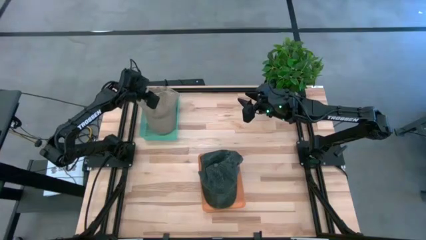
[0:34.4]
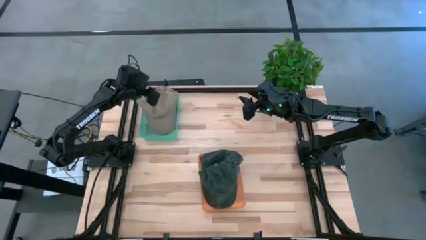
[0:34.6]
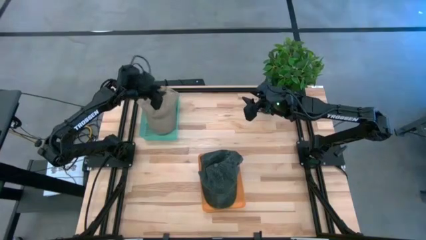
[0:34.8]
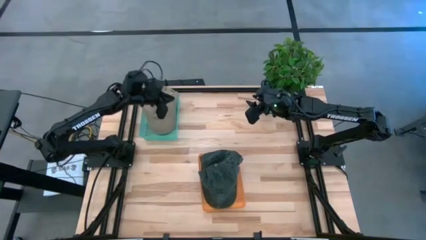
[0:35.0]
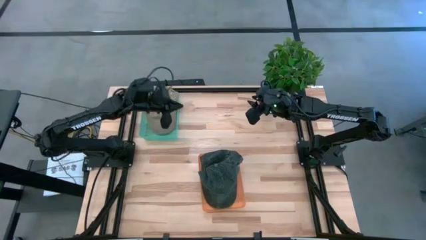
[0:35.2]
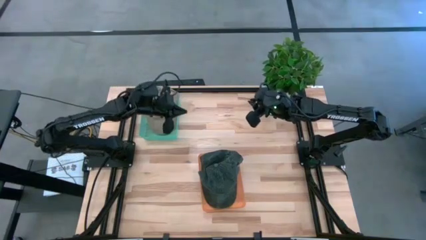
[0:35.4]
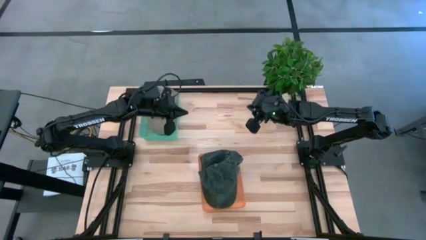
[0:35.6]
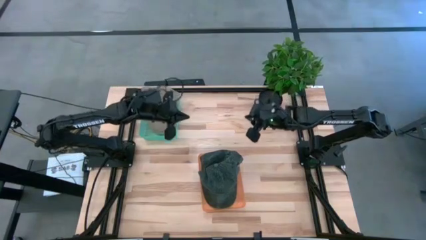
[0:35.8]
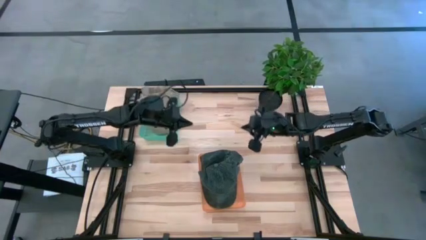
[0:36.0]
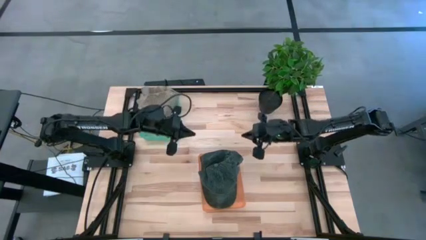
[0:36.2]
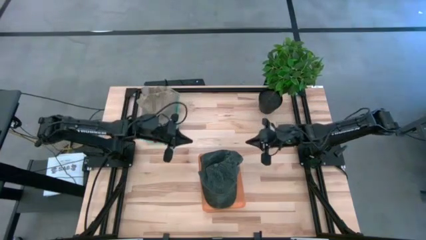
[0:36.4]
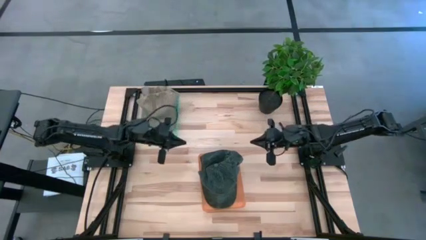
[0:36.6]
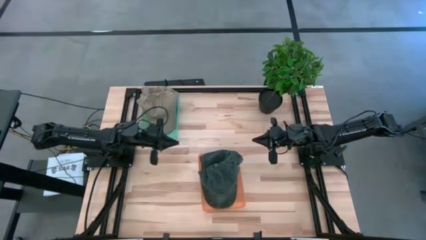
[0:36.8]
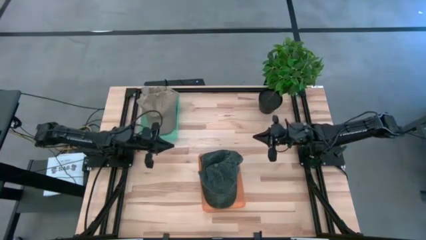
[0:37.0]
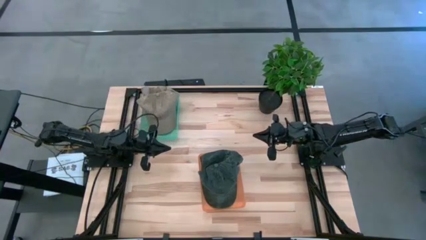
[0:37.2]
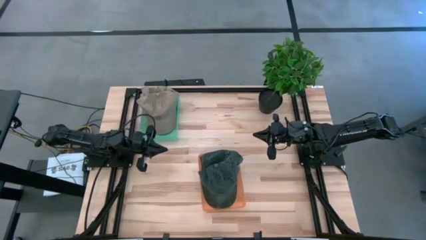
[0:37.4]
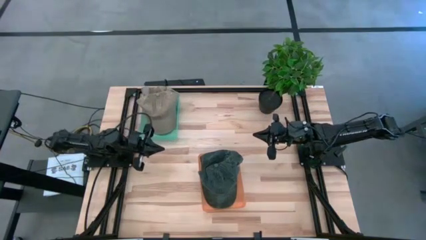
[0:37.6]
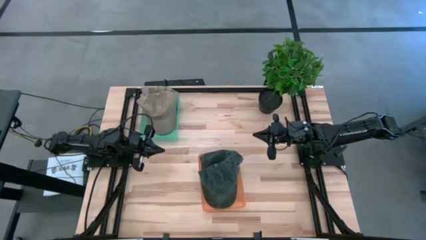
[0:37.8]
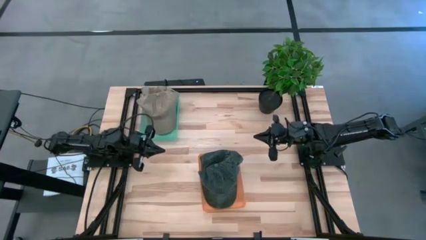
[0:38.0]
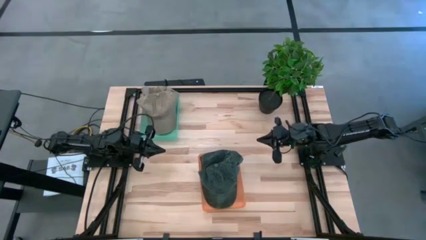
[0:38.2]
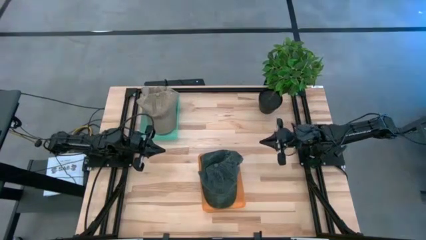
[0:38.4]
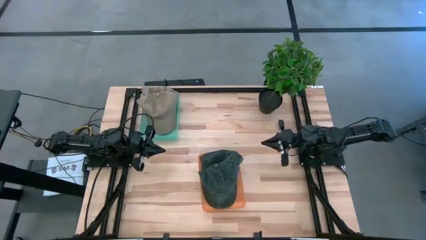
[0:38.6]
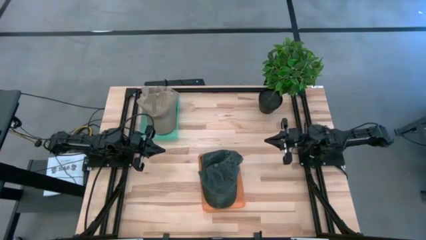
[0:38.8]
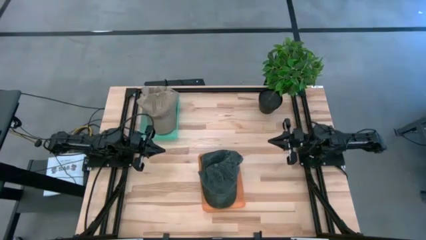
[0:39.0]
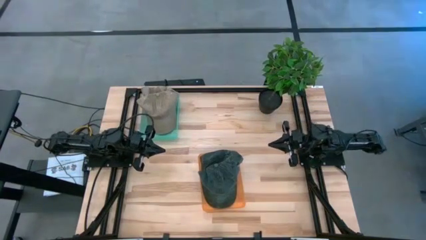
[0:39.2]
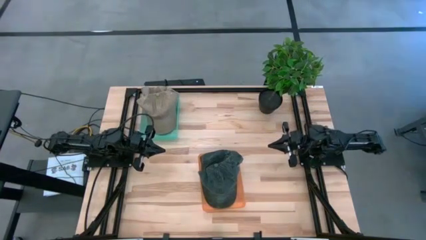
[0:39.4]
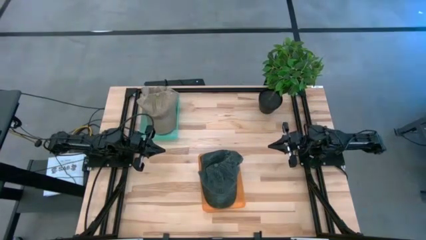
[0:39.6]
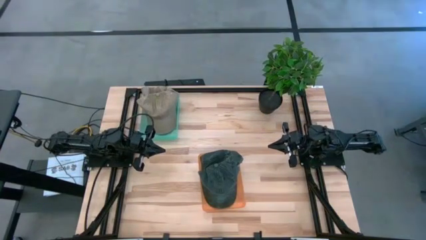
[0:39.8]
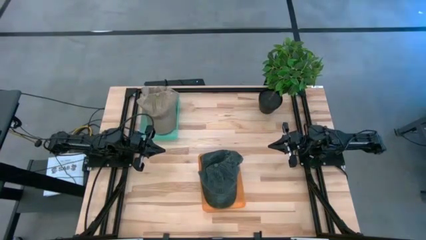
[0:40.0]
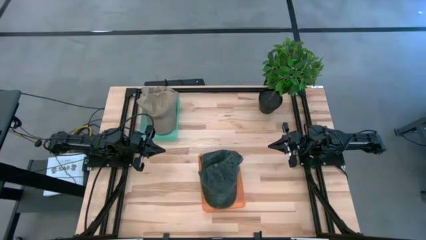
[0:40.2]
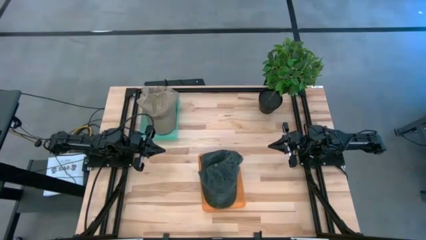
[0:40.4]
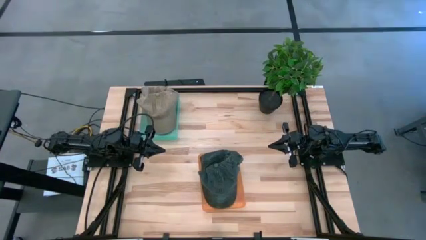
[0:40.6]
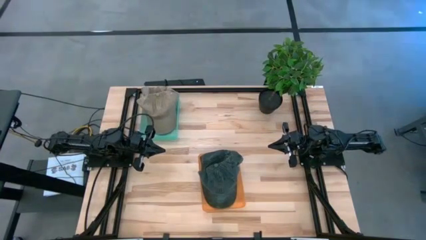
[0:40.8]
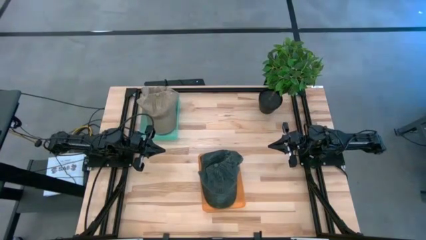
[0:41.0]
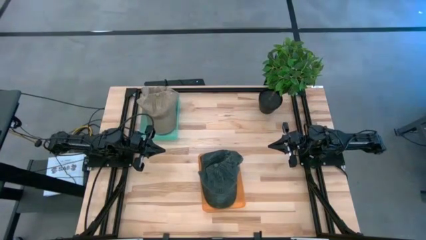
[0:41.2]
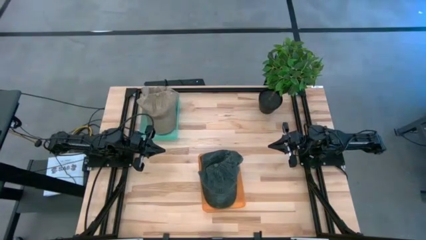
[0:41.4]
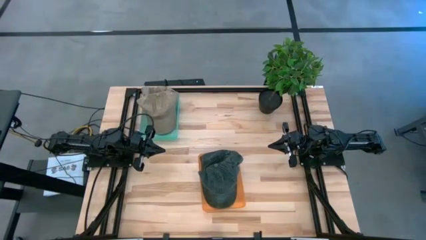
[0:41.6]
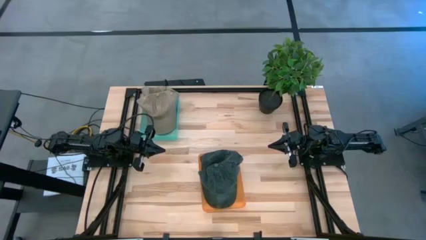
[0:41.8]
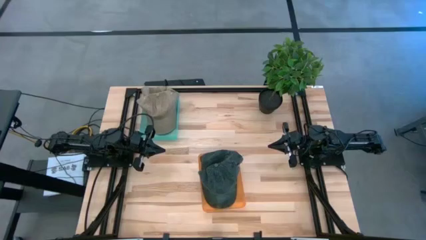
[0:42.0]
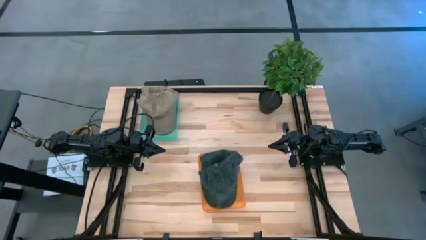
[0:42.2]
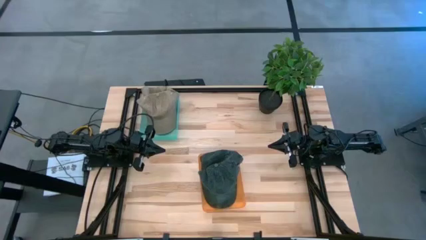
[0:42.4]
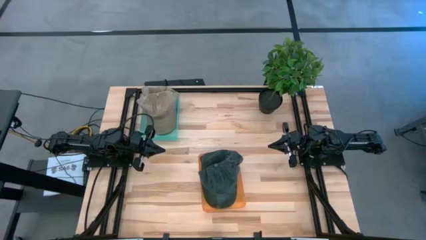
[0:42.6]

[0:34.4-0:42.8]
Task: Pick & Place hat
Return to Home Position

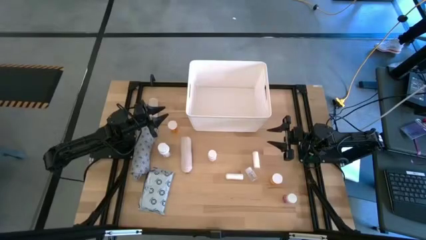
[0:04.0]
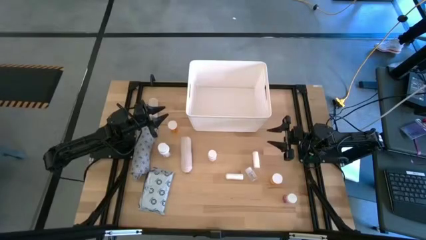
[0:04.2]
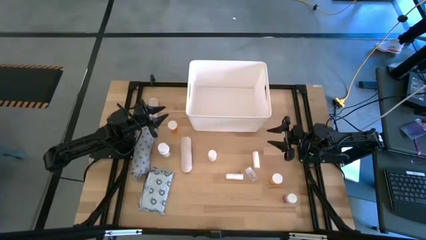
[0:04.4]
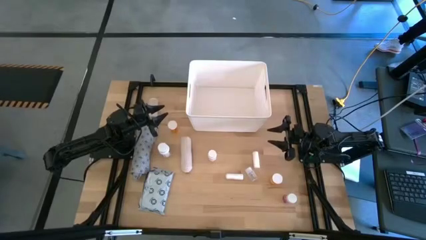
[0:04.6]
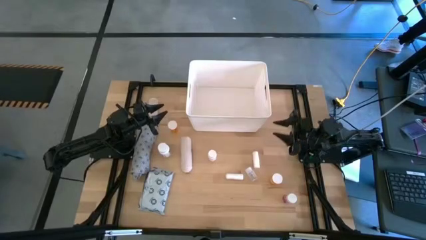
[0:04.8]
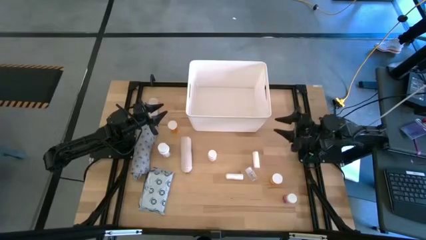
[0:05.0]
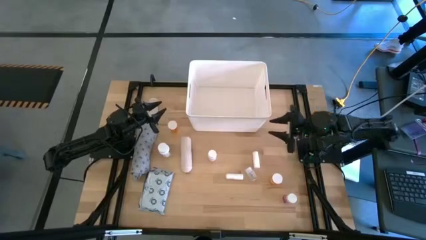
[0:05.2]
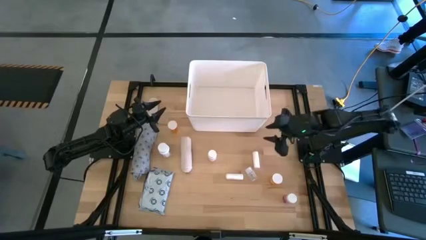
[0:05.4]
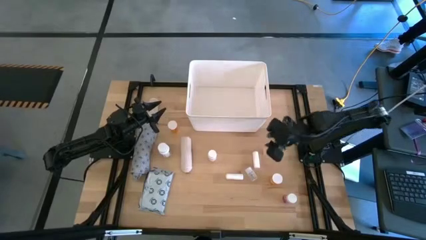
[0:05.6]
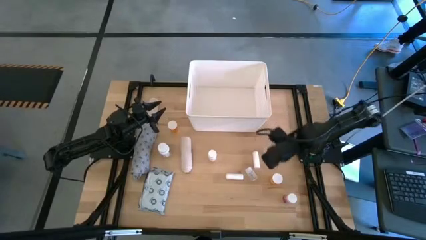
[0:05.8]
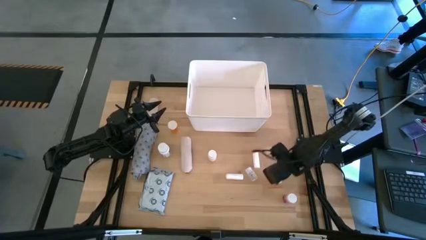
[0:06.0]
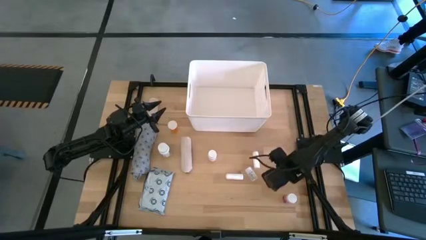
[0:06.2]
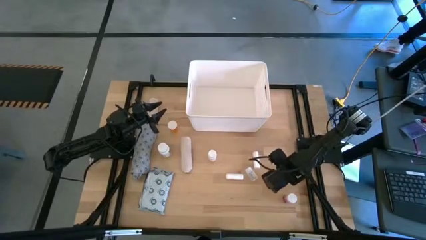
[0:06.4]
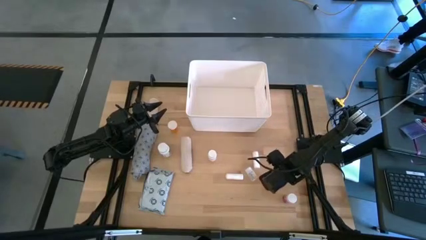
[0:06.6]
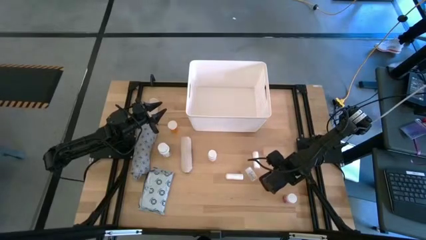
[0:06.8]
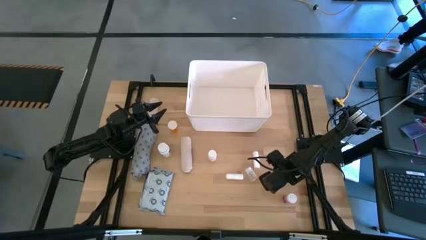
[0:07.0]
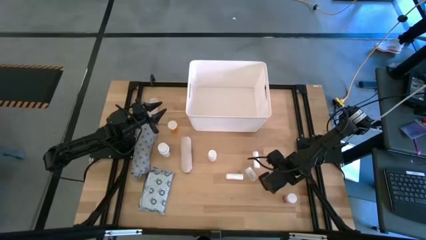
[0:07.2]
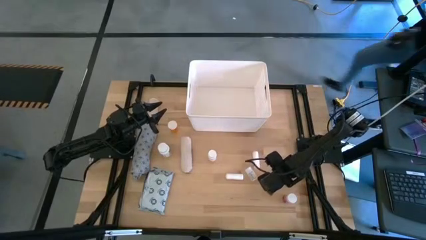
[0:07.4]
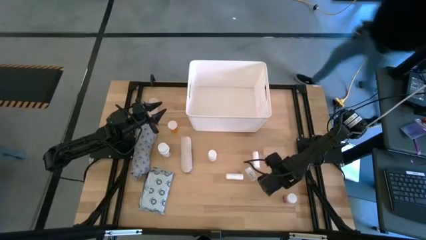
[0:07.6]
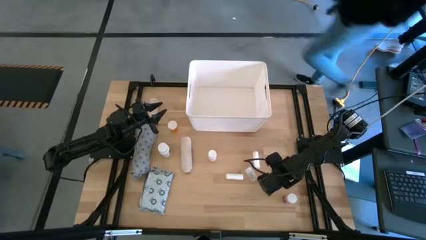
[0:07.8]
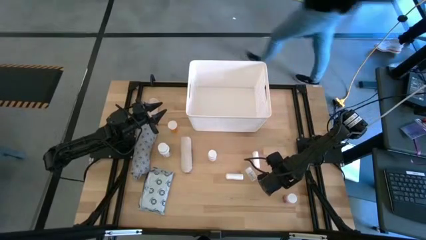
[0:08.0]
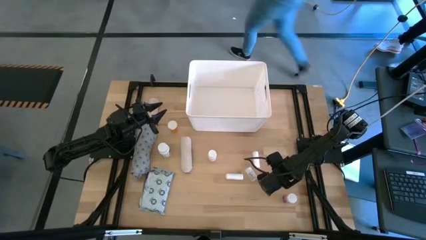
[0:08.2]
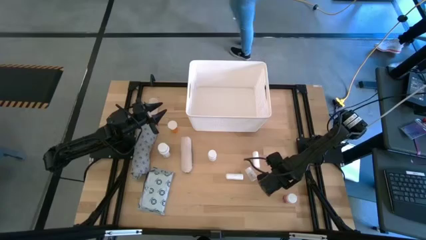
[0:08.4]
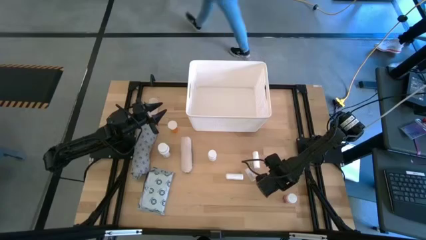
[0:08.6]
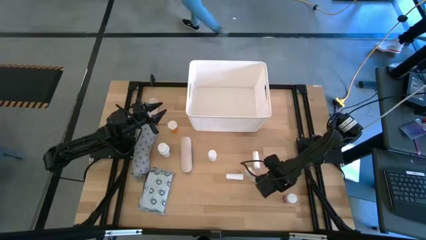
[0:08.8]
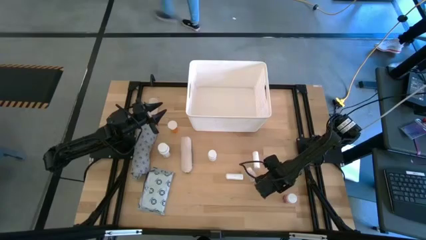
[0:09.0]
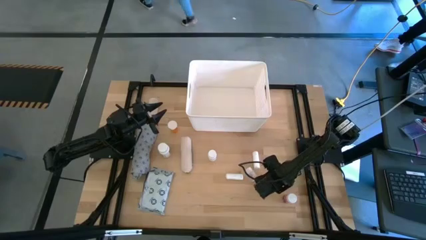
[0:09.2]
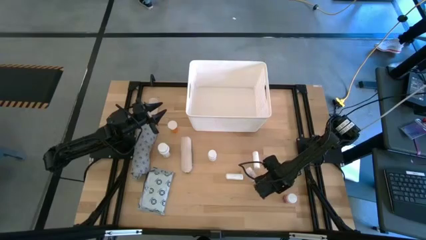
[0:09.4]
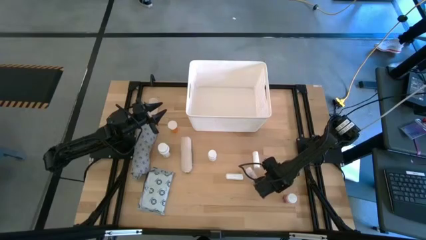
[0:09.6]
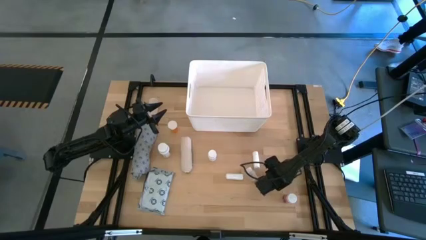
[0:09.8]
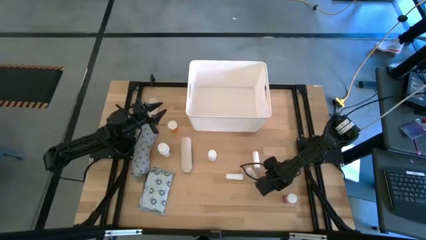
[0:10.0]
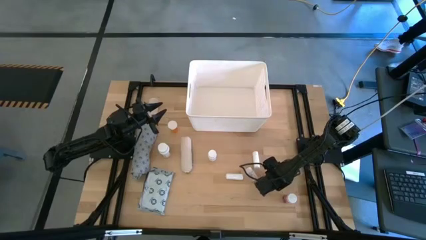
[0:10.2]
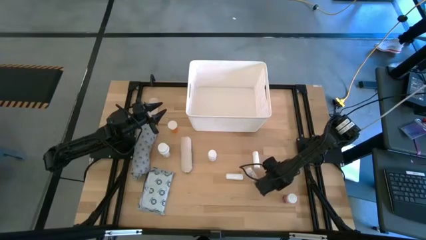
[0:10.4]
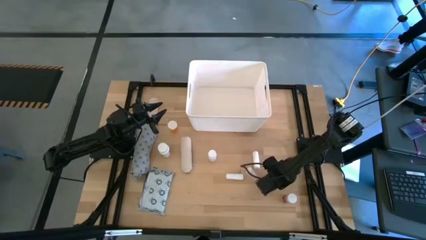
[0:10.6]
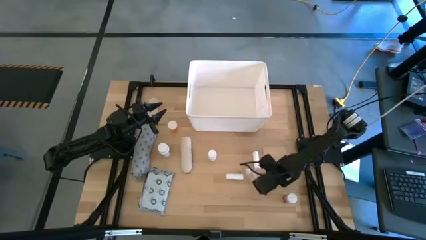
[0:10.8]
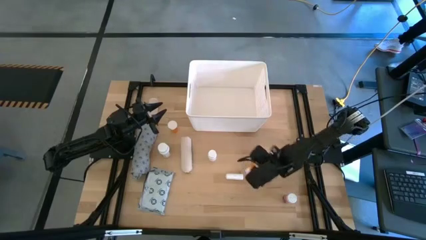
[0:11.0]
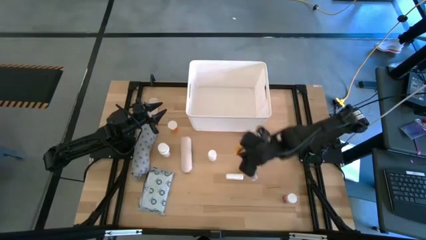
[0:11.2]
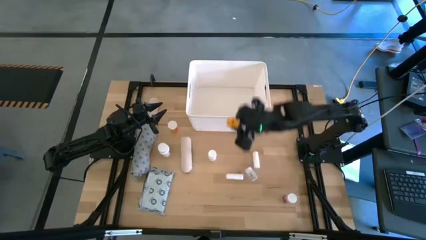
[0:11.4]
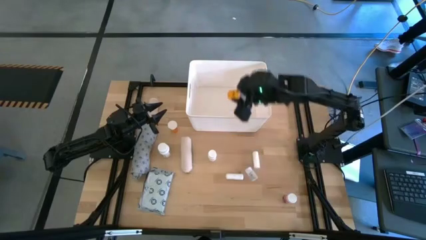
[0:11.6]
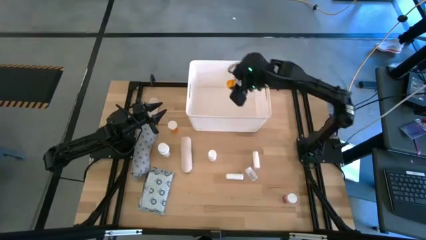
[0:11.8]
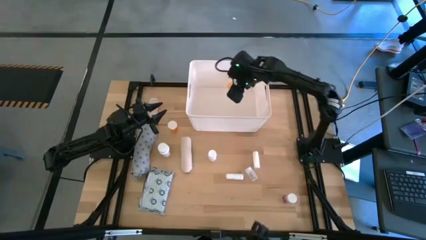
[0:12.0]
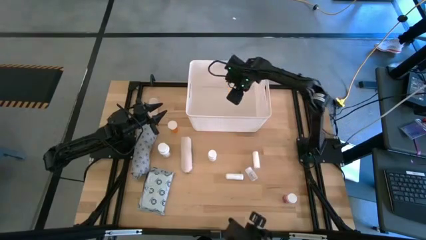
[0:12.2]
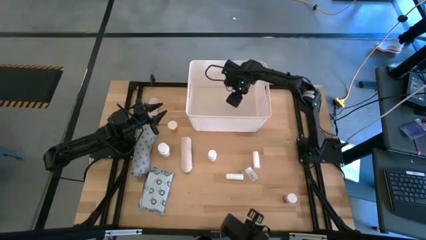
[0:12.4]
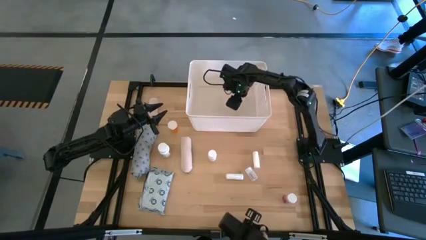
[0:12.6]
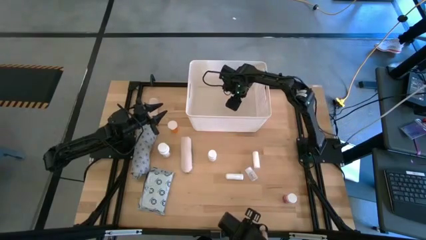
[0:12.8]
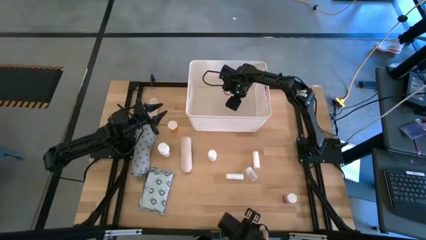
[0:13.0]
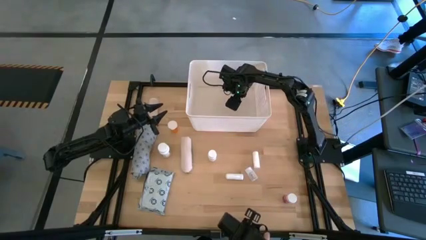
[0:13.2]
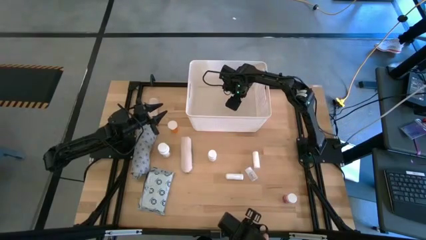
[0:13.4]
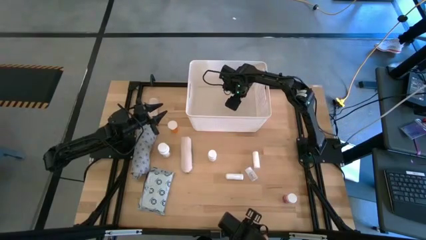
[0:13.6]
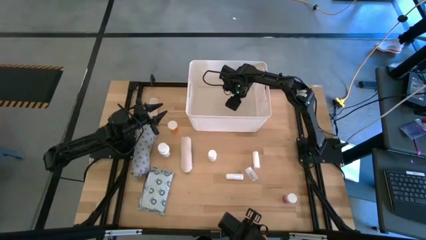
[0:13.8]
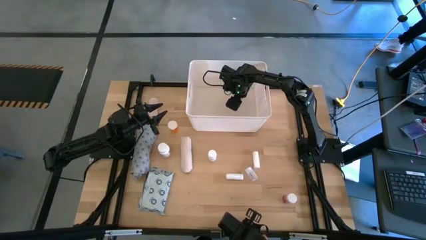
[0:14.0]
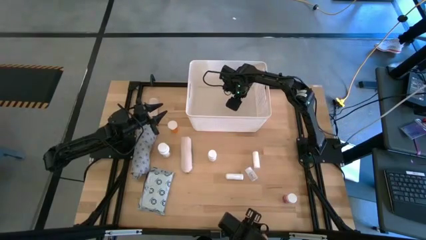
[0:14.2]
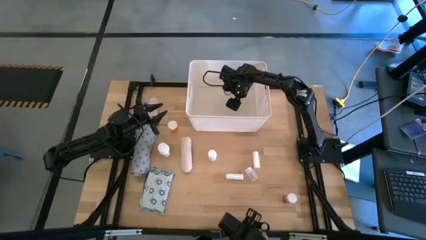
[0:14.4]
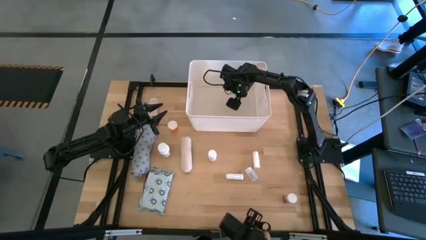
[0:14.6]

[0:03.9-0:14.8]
Task: Pick & place medical supplies in basket/bin
Put the right orange pill bottle into the white bin
